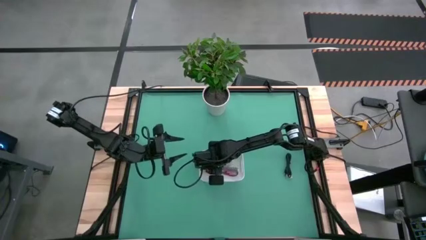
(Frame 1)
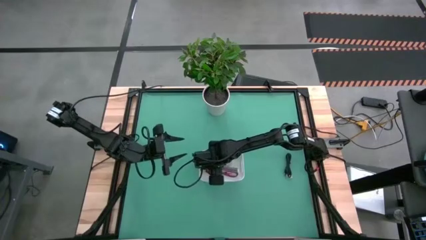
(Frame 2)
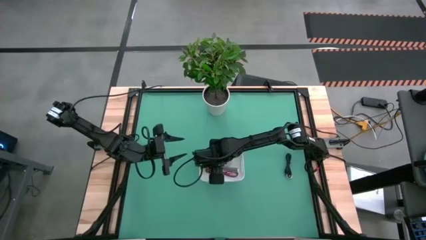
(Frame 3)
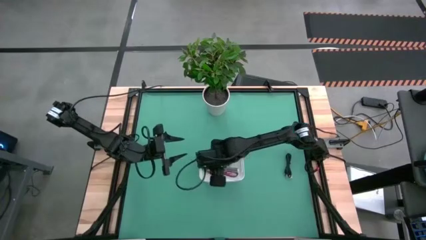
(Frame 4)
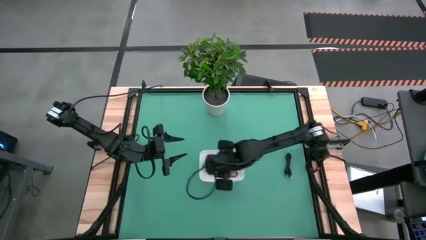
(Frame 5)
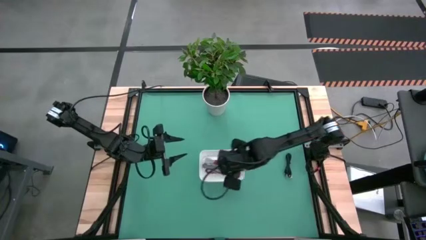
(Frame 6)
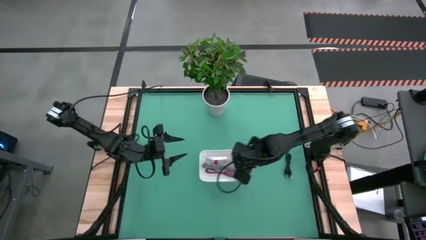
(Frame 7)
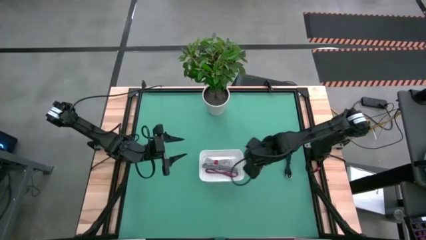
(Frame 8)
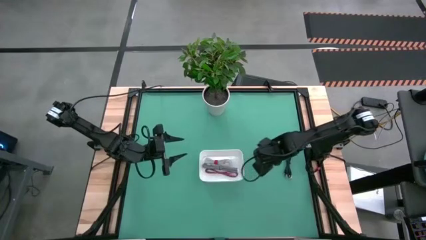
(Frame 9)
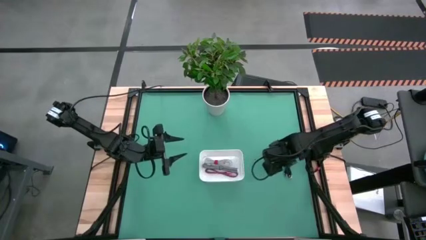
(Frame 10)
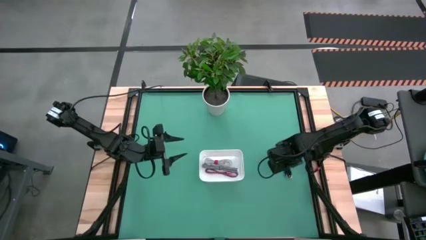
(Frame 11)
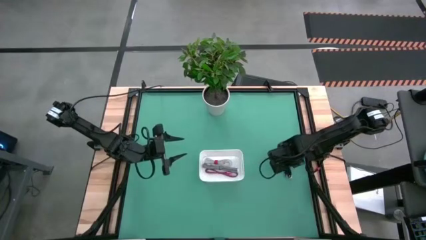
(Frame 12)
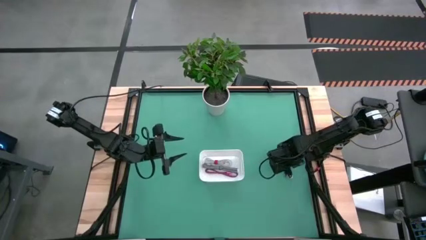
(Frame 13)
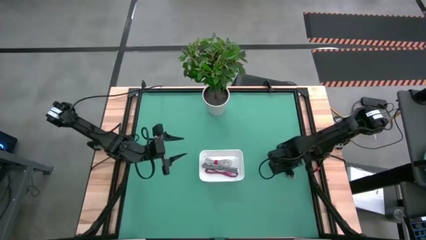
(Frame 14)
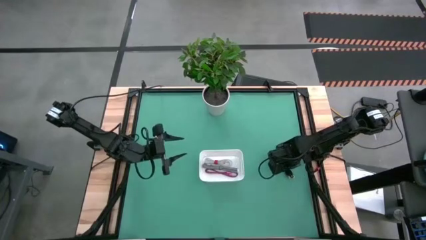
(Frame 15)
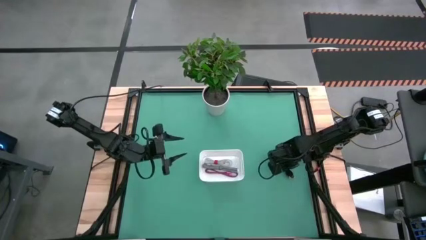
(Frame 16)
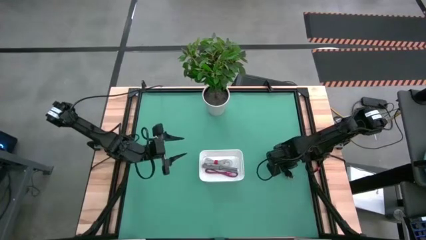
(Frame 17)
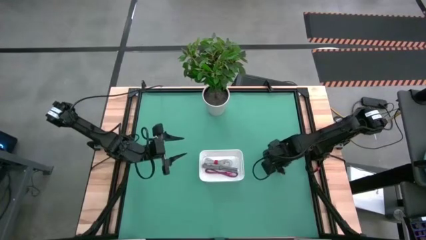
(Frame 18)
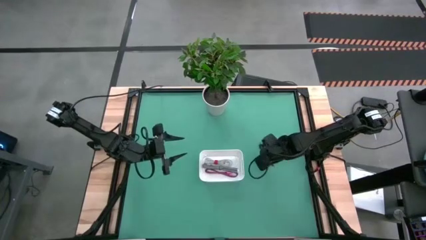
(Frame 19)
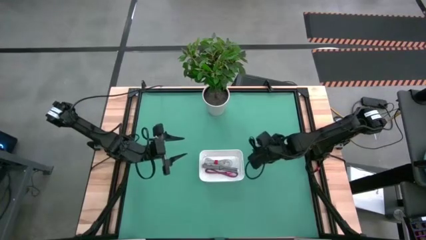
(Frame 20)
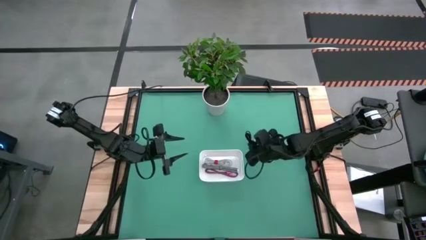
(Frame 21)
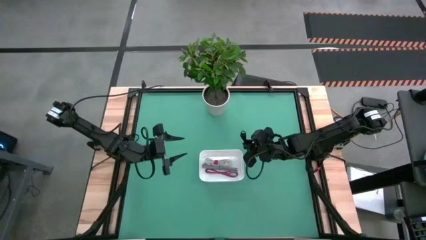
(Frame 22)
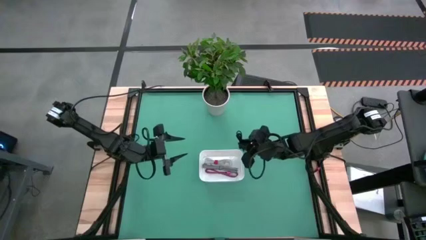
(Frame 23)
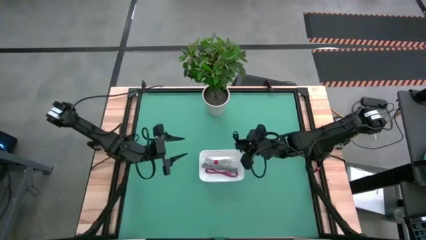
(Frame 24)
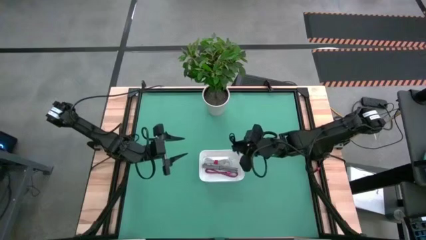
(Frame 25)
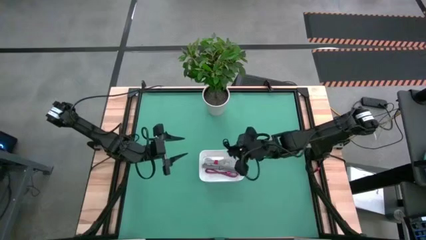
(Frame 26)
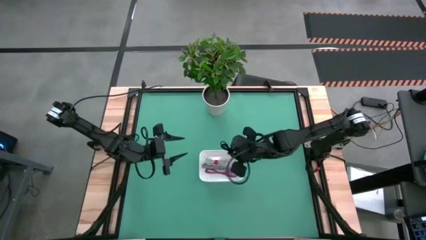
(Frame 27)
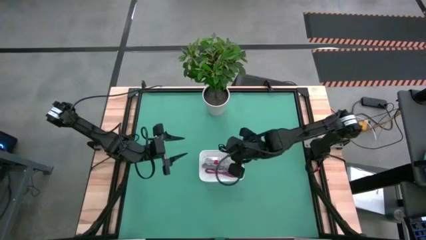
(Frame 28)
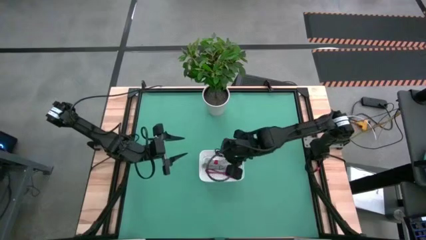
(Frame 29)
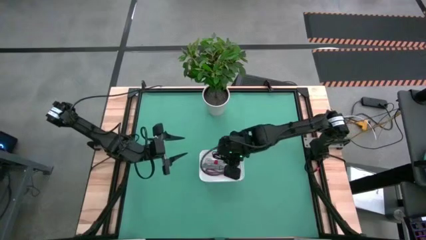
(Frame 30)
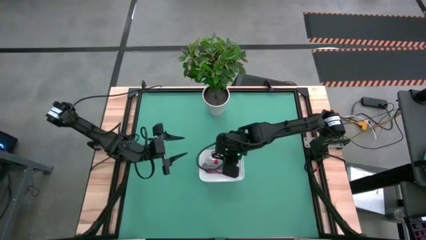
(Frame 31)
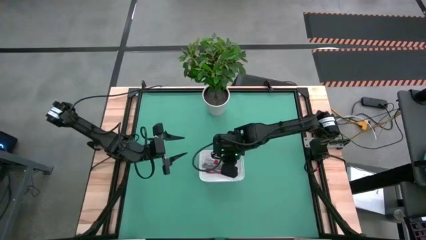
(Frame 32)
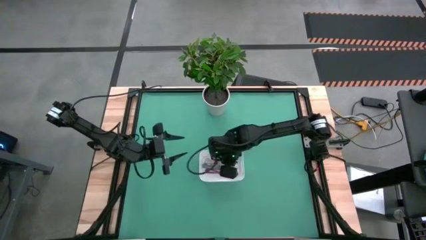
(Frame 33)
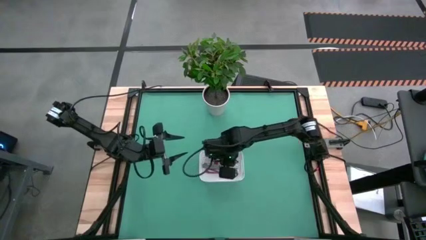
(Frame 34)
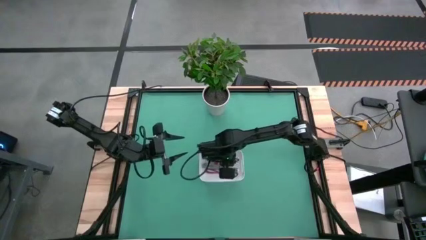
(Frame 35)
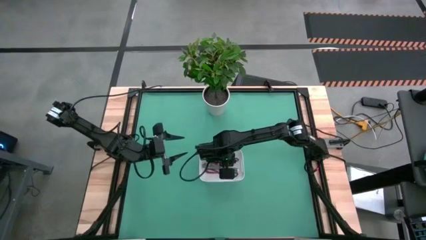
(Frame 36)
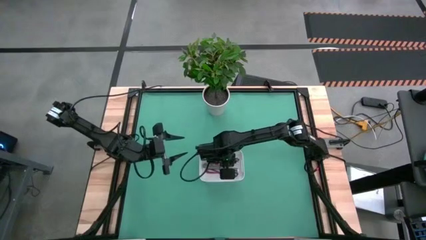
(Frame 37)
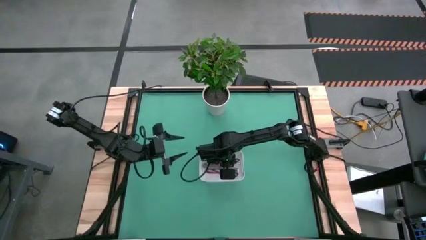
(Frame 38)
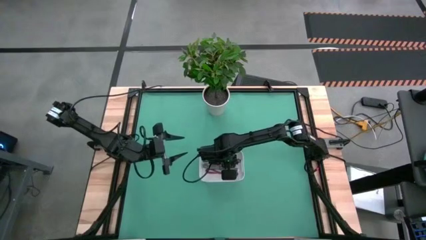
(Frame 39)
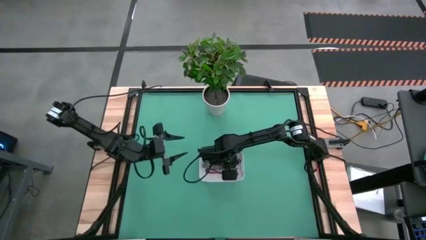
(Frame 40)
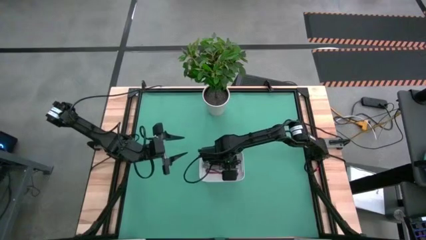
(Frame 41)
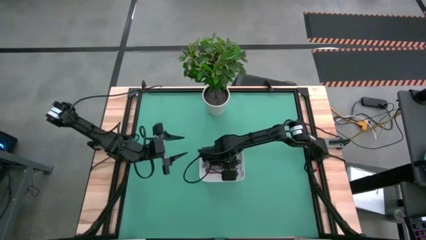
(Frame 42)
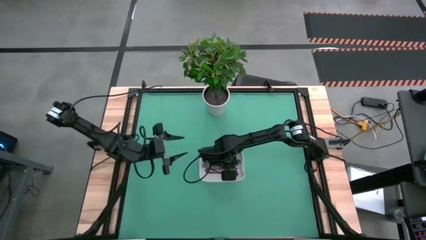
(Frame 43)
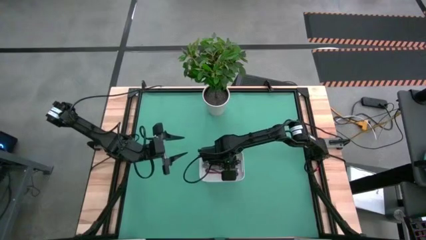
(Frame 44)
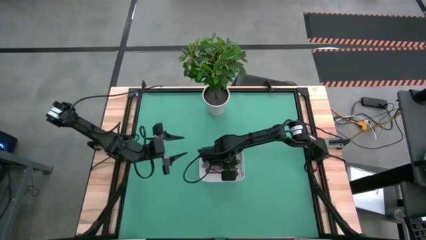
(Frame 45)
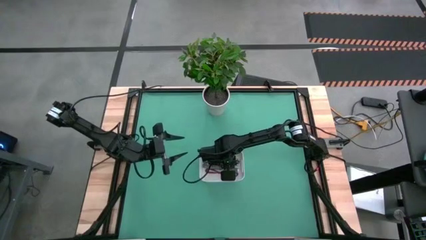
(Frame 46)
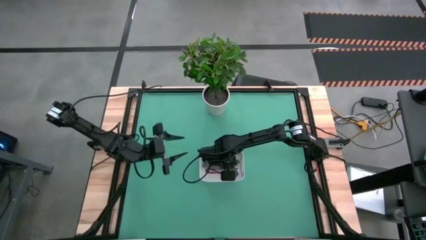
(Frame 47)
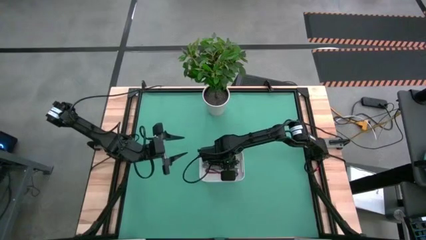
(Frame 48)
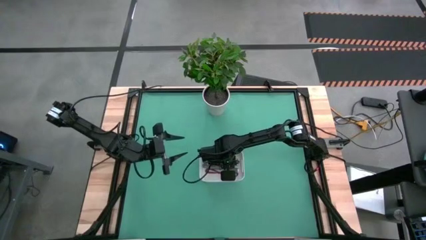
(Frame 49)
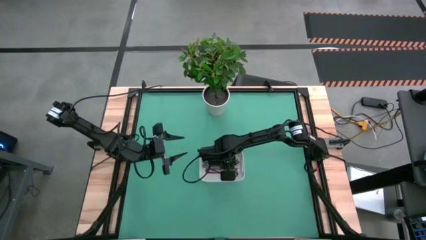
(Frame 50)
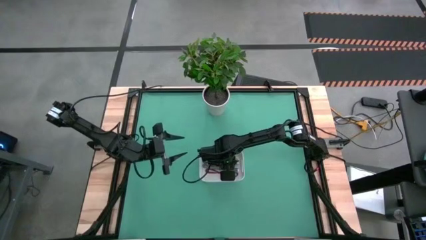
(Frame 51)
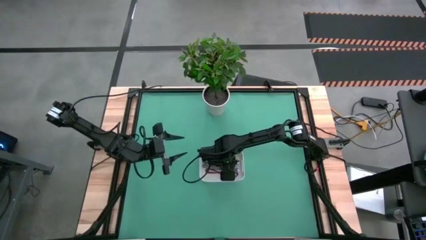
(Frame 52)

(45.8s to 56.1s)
Task: Pick and place USB-C Cables
Put the black charger cable into the white bin

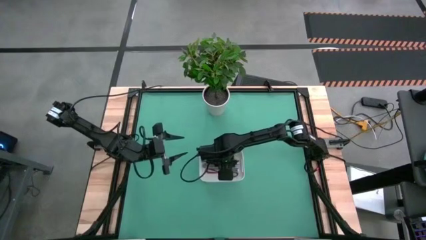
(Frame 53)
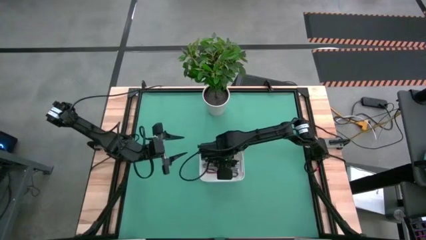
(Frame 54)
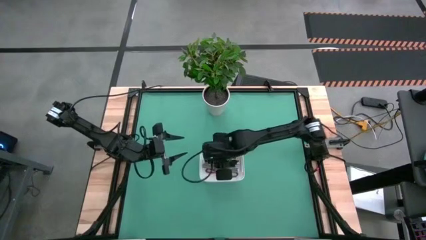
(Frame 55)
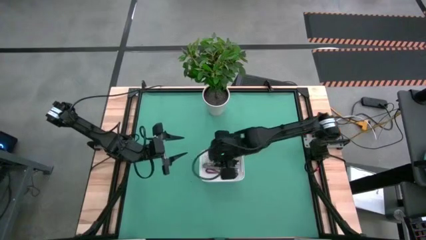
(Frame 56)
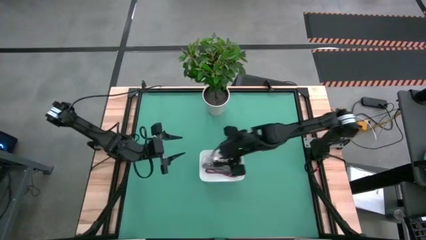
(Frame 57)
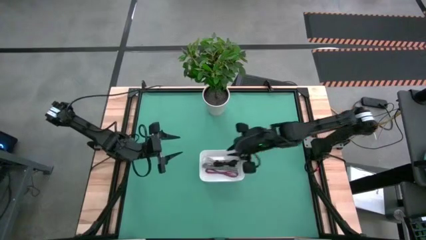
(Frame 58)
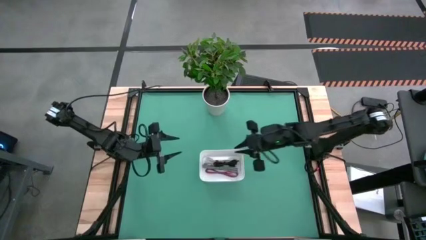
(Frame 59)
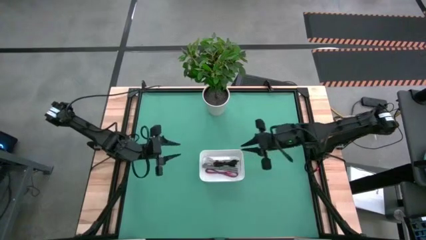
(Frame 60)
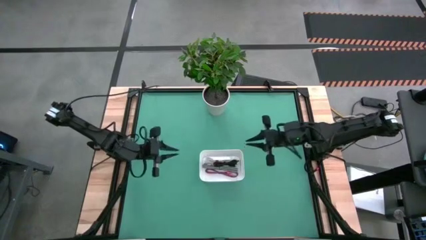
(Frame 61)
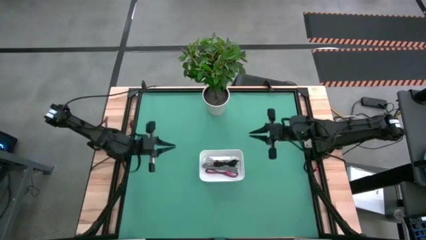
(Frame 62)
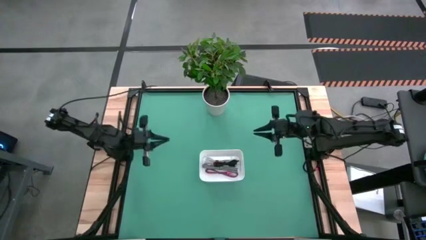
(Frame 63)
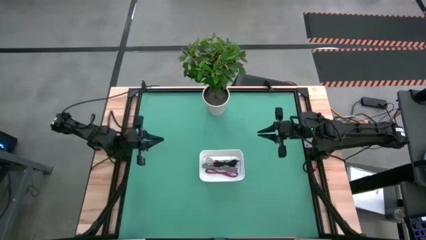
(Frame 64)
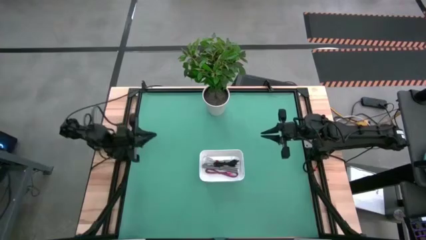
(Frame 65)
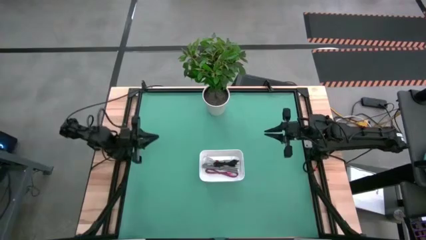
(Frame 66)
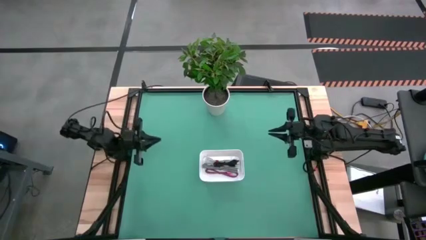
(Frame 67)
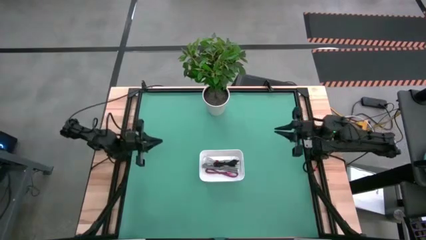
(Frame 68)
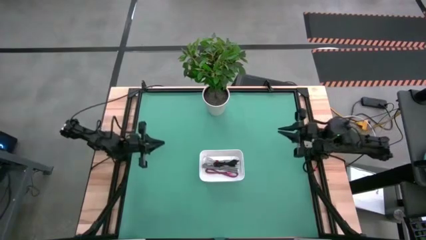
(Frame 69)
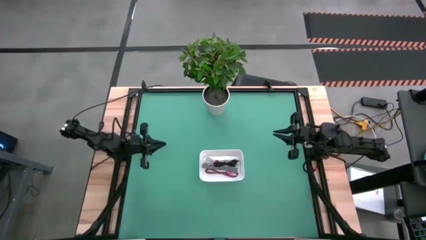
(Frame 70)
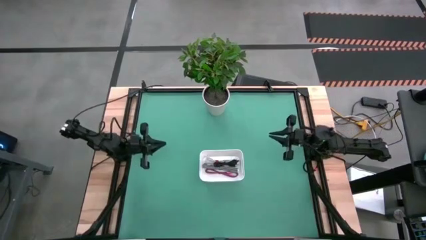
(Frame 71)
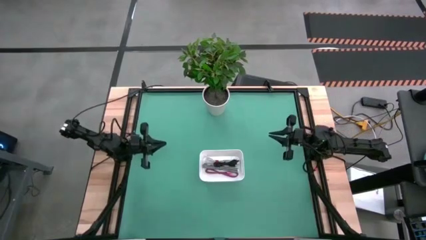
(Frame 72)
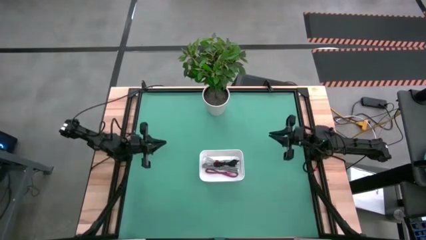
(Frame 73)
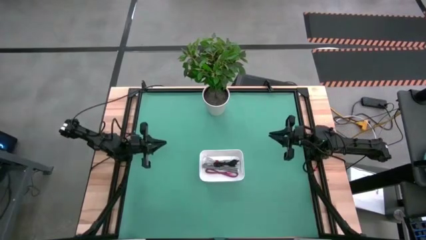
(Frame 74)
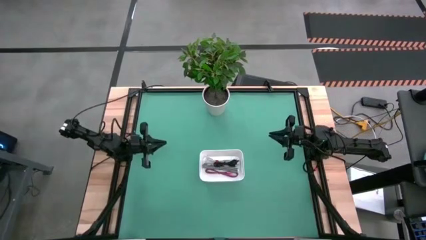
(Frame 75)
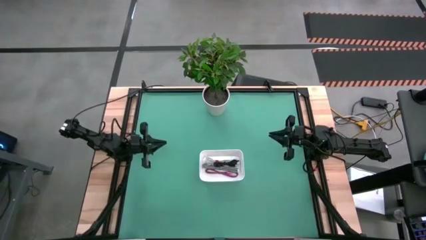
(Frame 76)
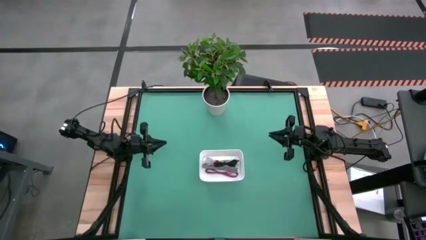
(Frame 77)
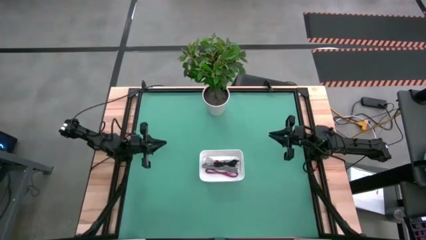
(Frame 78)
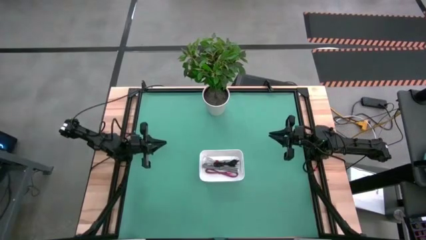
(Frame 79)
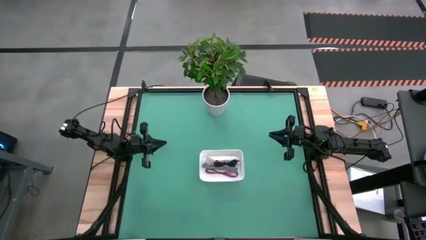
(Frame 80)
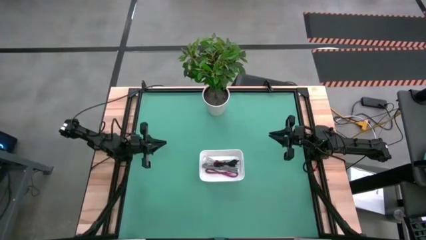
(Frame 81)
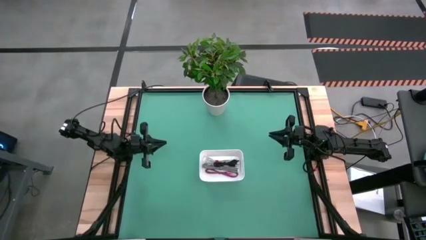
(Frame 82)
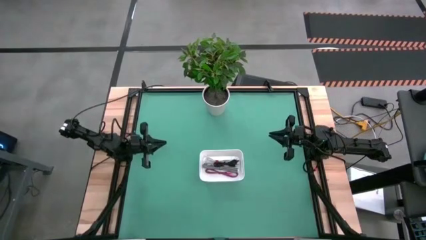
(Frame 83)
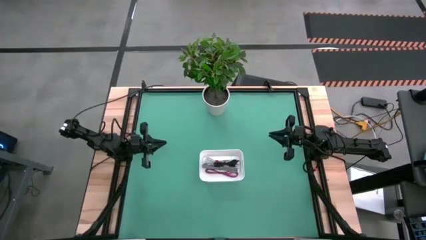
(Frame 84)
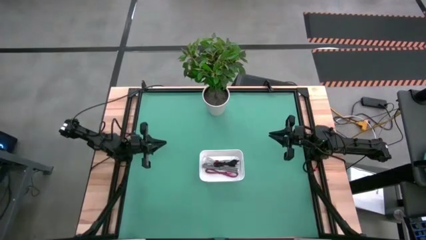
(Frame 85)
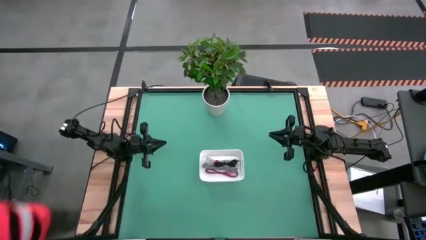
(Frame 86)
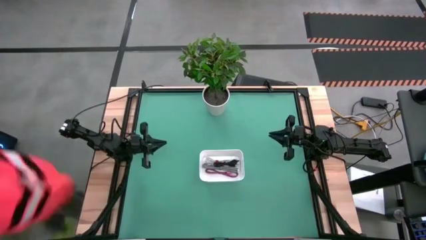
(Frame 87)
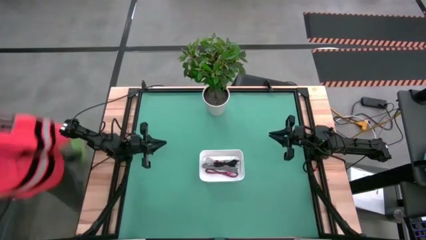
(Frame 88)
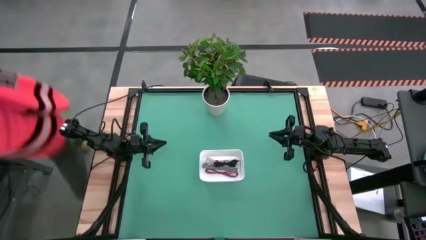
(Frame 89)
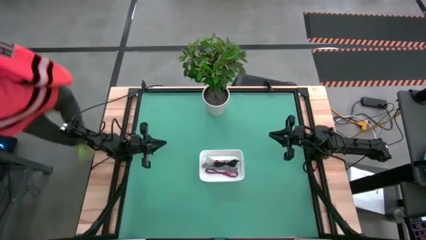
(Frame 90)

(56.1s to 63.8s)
Return to Home Position
